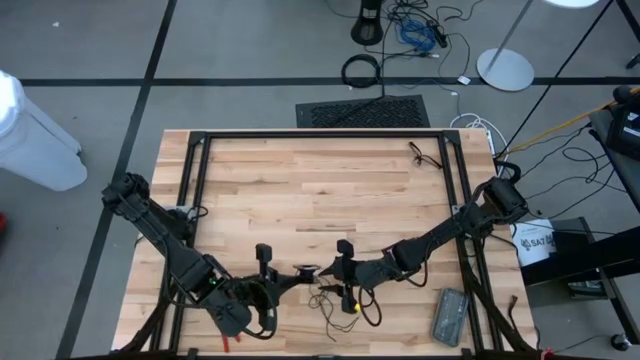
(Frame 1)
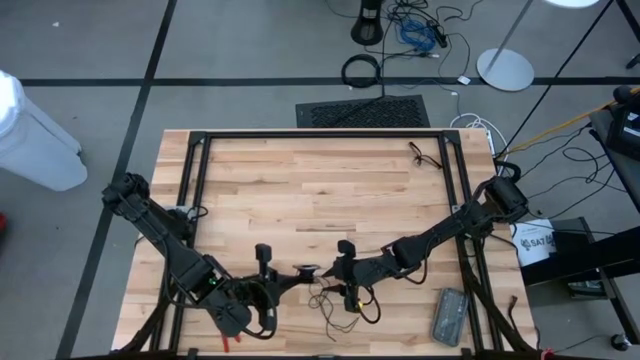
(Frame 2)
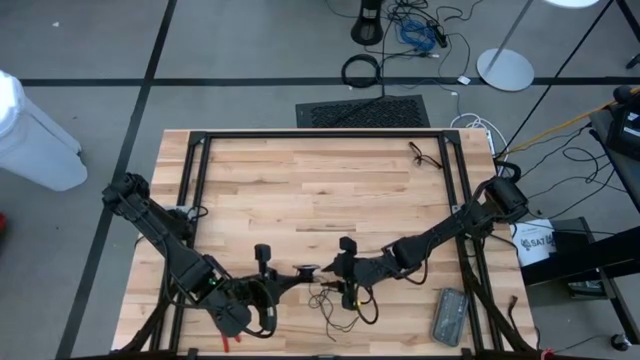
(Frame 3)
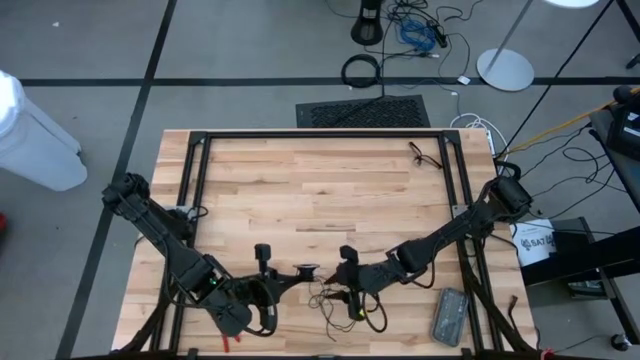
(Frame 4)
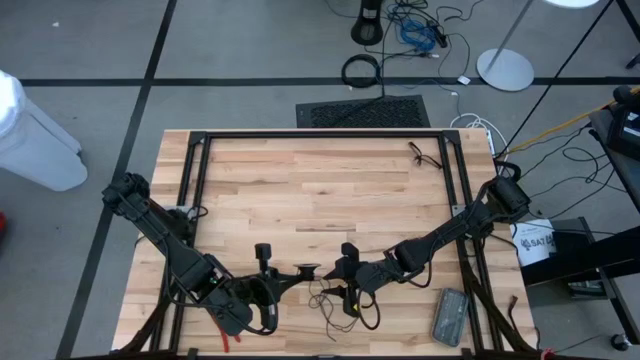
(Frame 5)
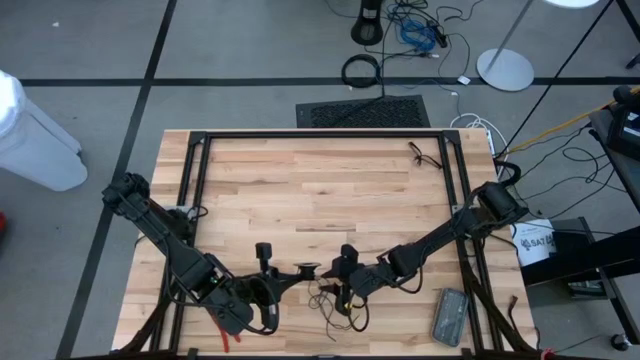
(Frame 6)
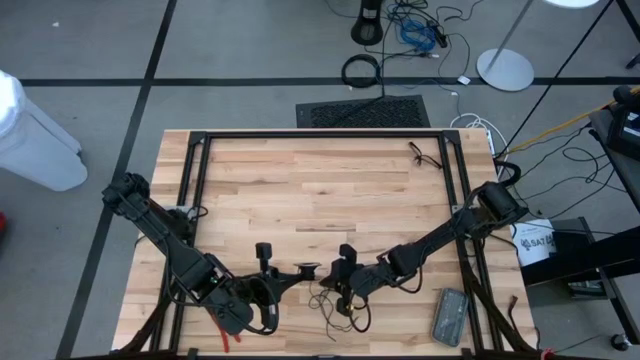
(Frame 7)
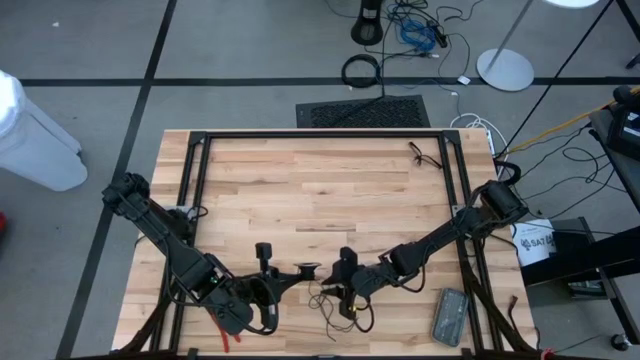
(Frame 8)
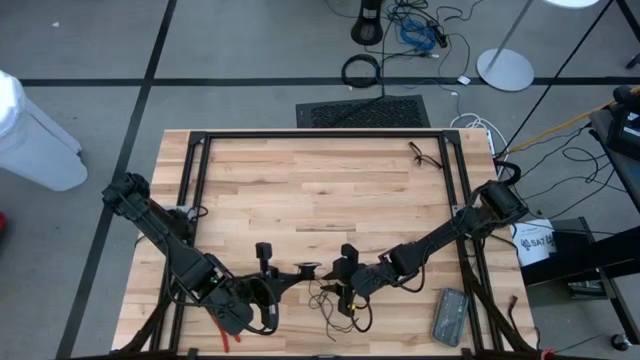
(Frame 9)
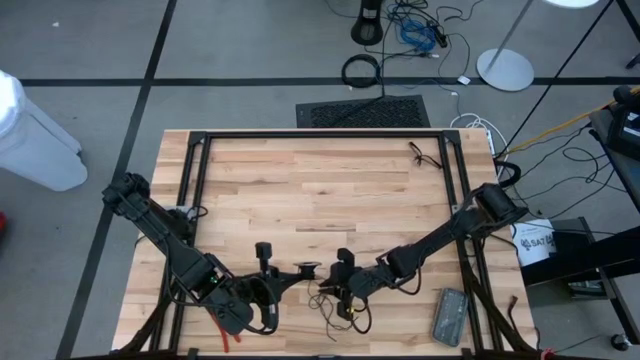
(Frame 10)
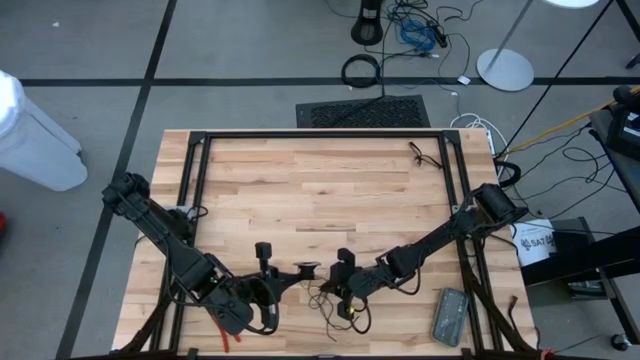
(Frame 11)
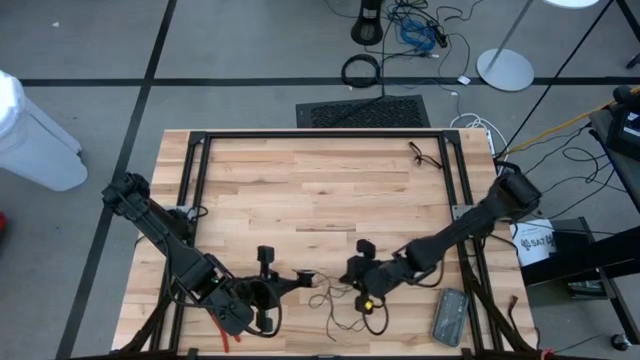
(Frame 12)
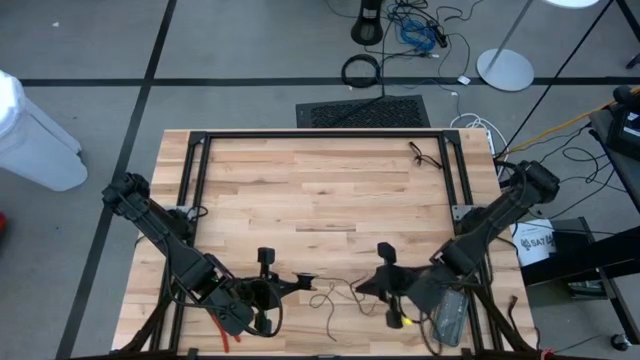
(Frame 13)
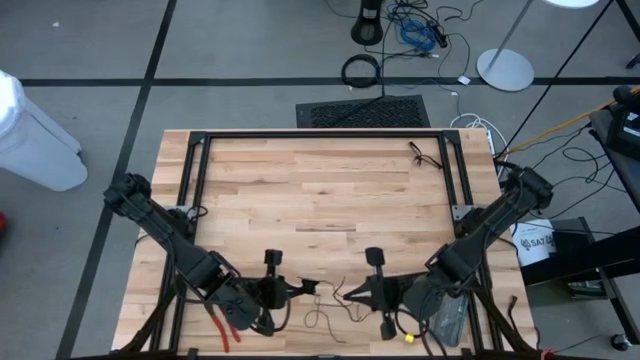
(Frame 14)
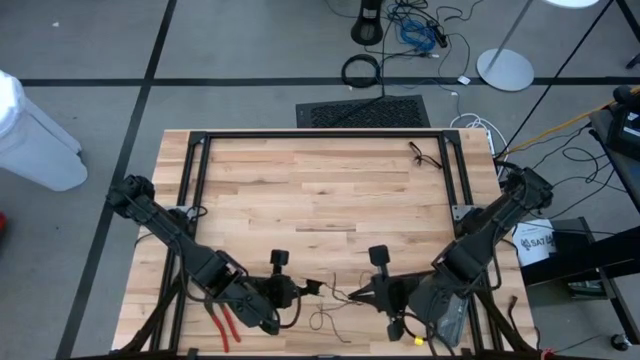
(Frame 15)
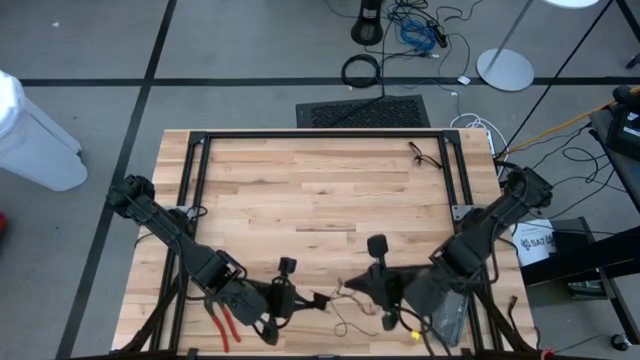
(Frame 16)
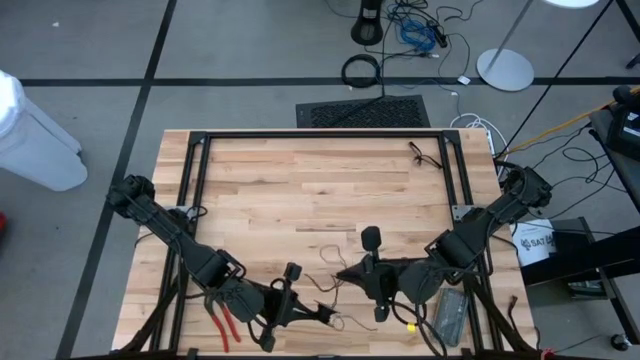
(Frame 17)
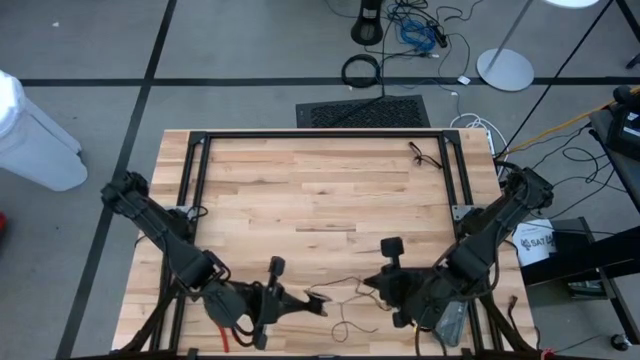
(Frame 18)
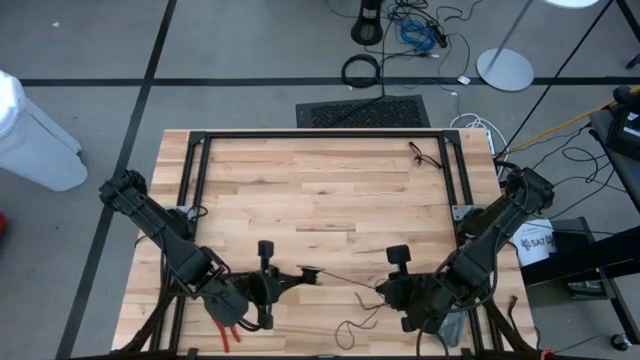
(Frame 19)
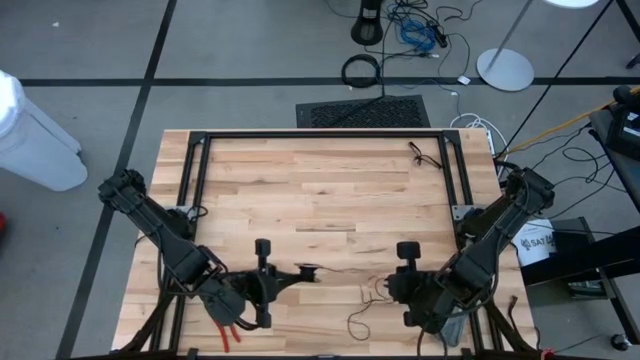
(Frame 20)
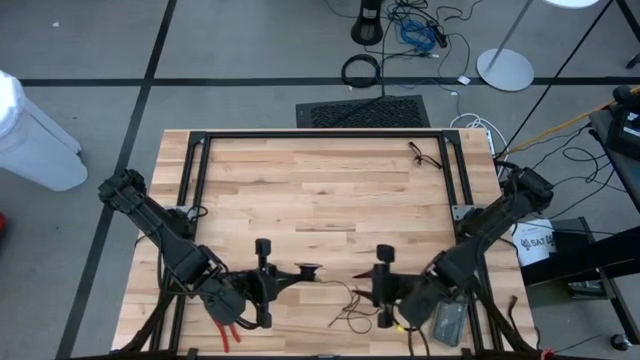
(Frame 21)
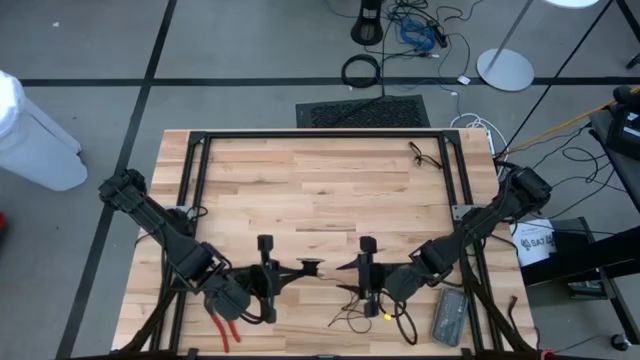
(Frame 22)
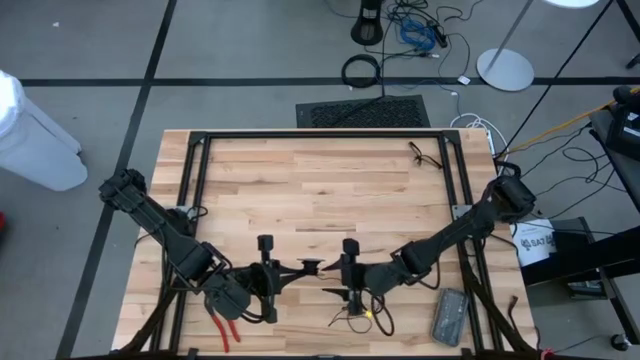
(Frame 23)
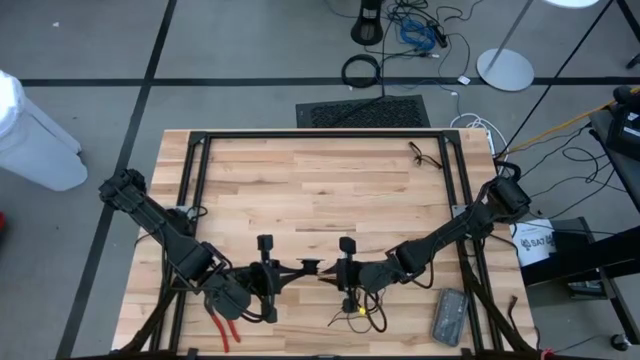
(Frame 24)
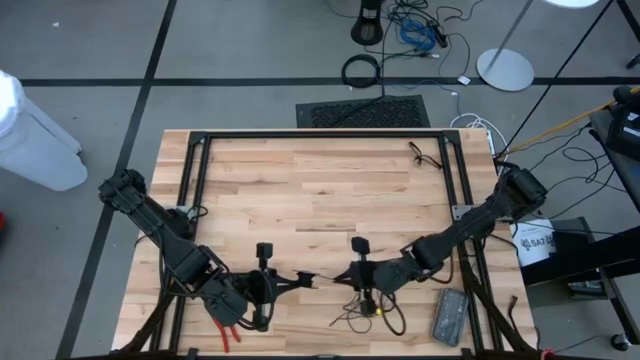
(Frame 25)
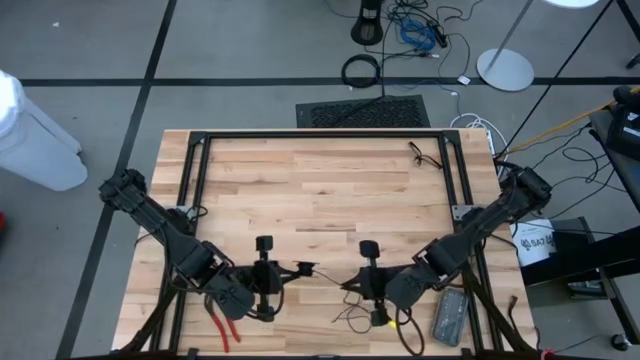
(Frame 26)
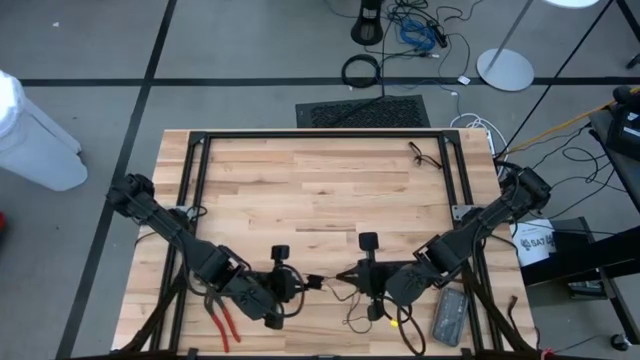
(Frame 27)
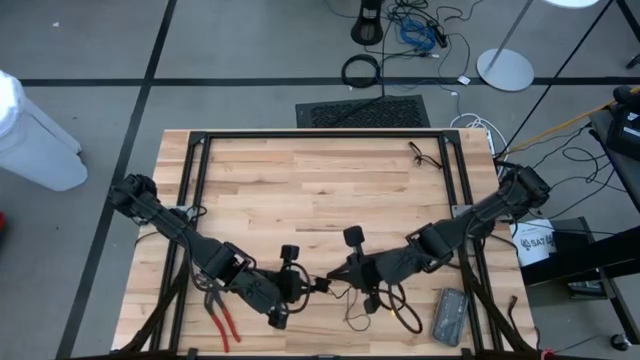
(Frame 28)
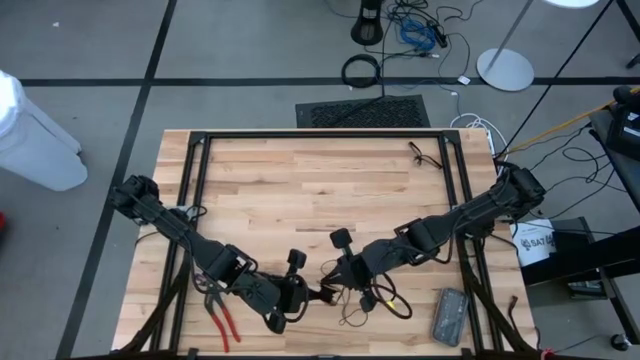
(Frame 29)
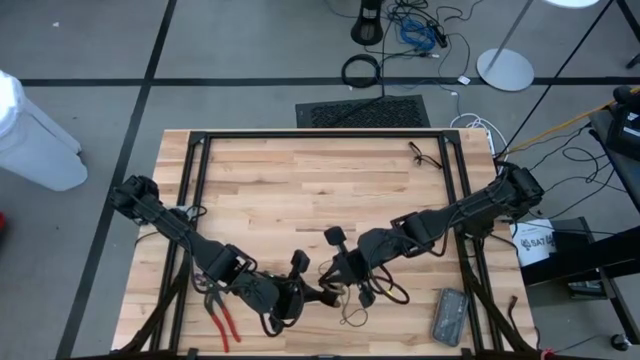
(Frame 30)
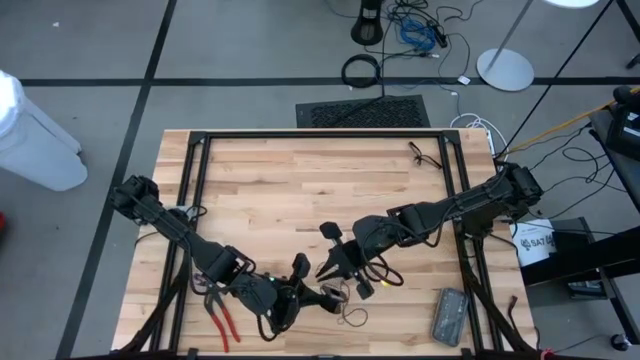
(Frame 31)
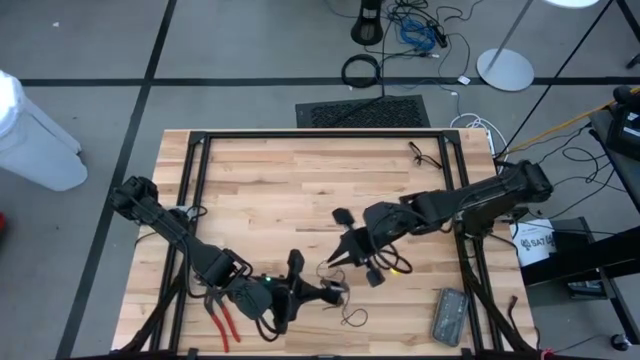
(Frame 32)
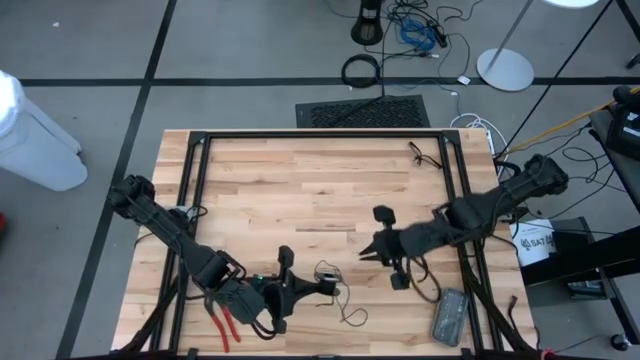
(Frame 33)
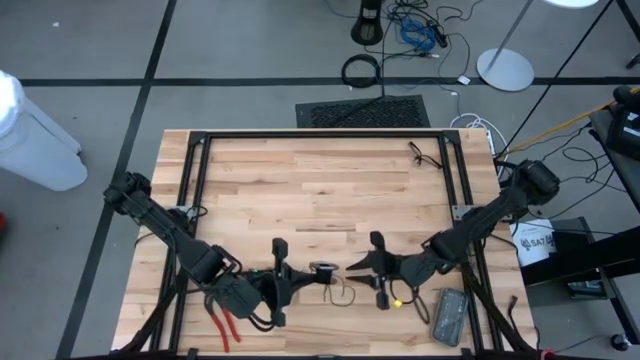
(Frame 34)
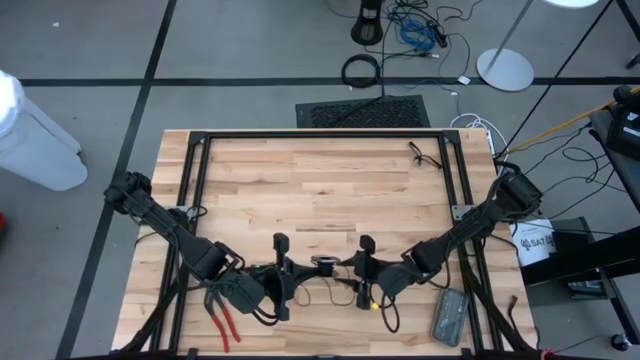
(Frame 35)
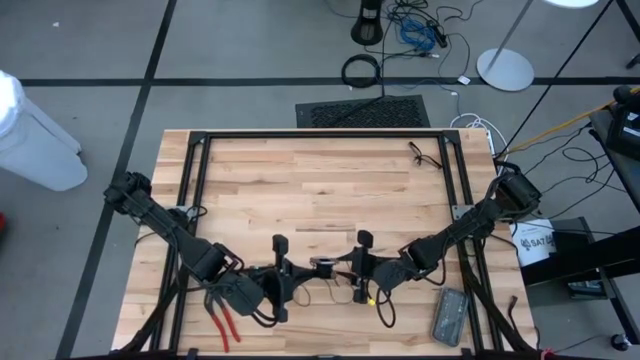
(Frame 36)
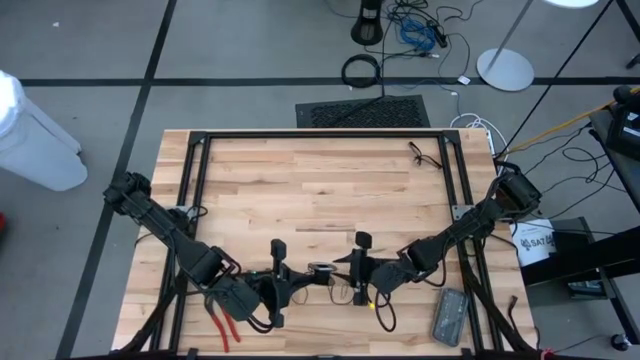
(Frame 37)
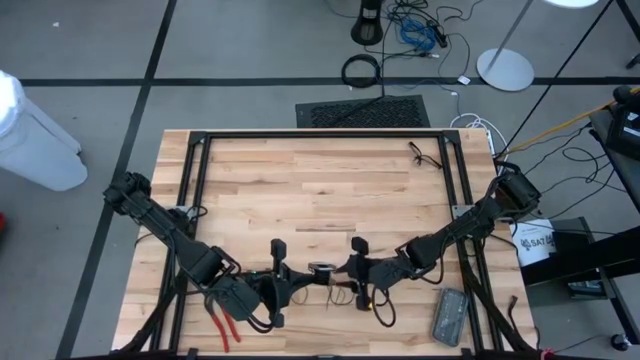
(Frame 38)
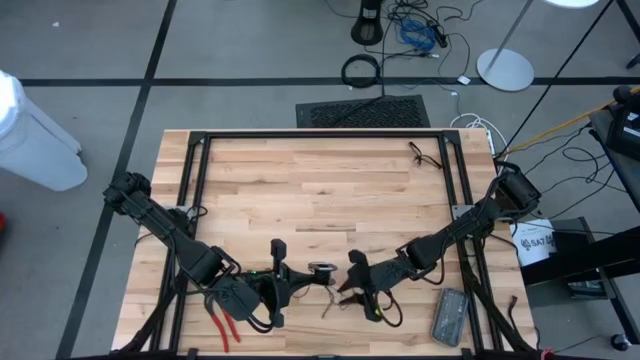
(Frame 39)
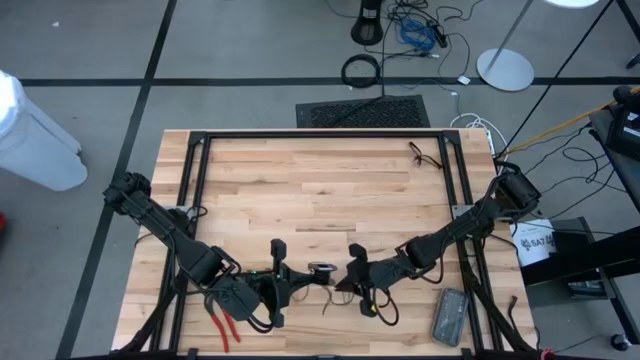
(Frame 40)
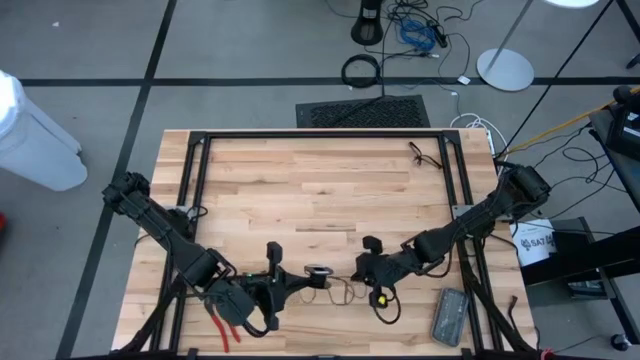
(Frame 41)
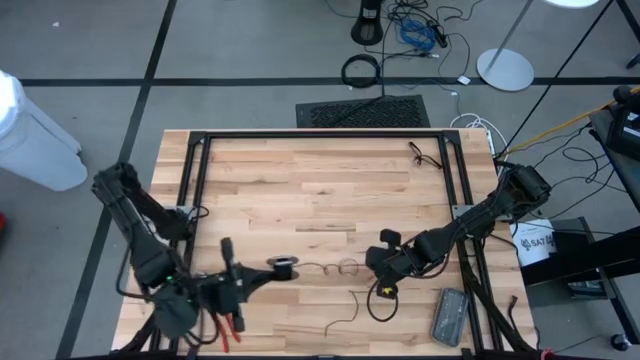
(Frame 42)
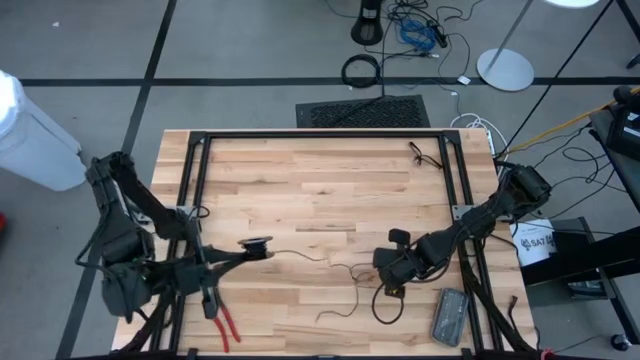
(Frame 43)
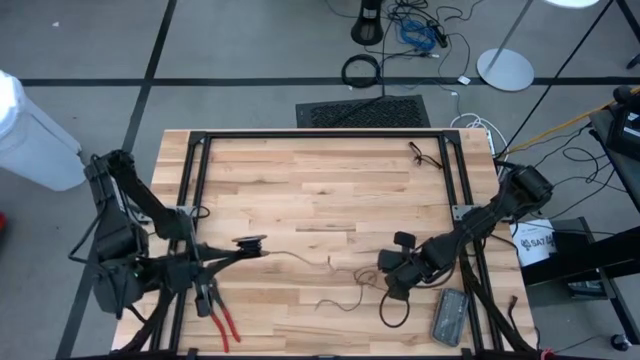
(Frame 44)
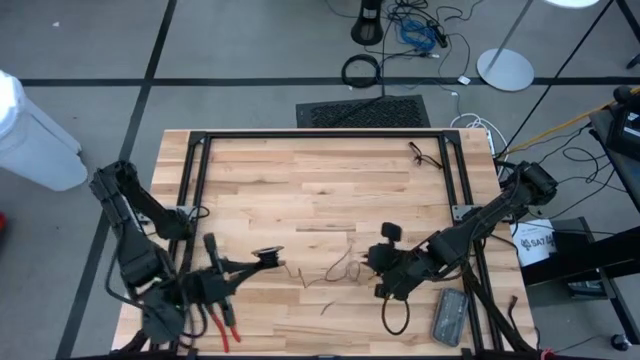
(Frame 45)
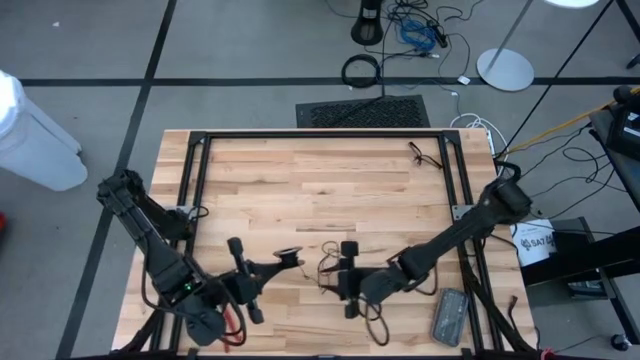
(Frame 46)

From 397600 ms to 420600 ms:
Task: Coil cords
Coil the black wire onto the black spool
